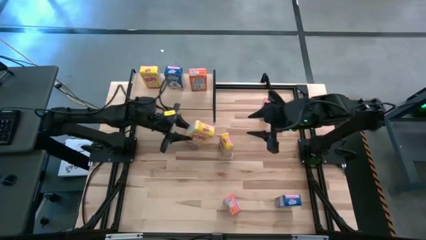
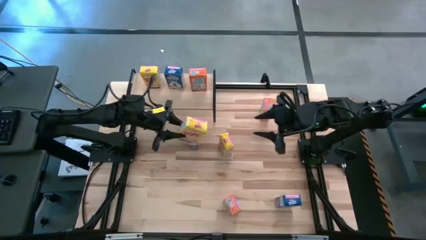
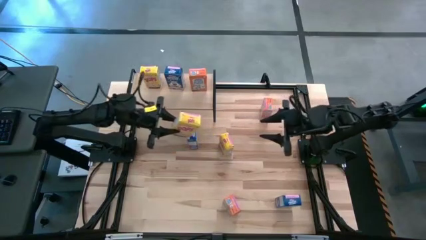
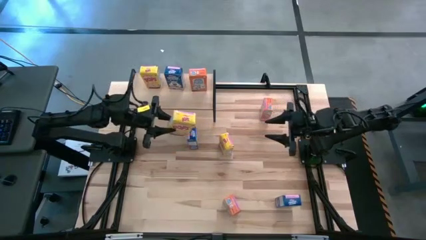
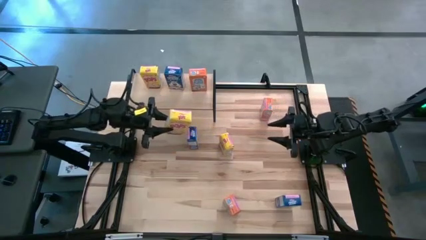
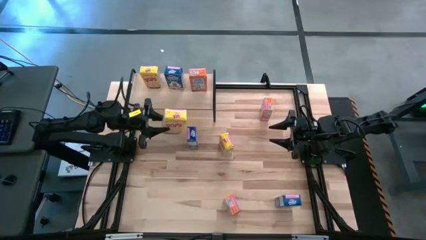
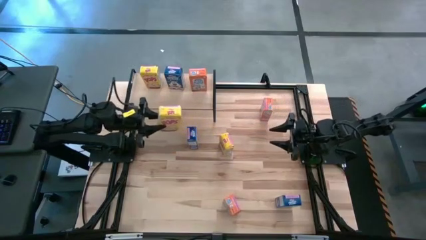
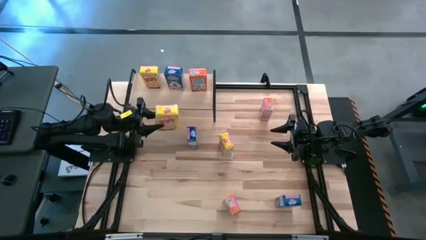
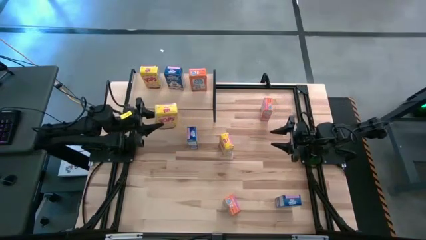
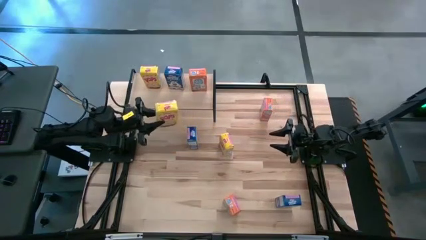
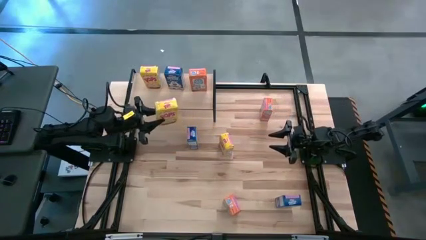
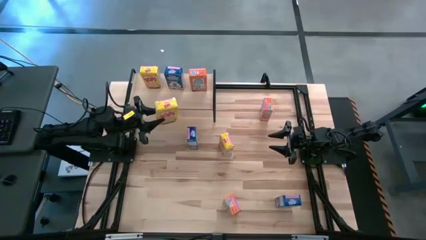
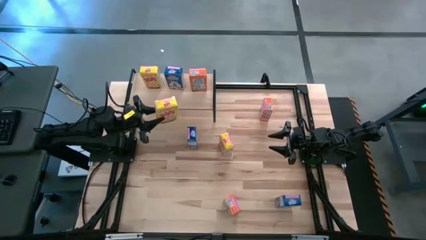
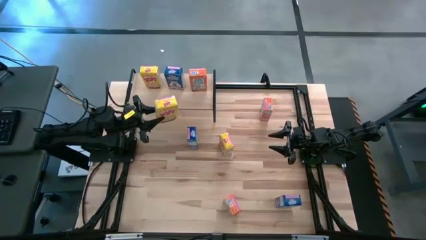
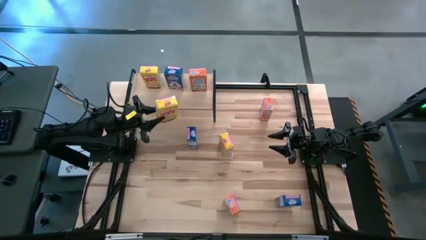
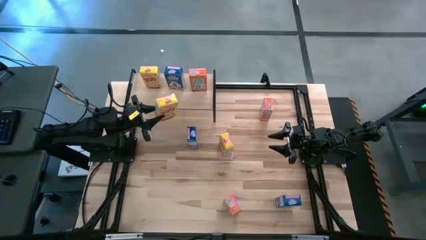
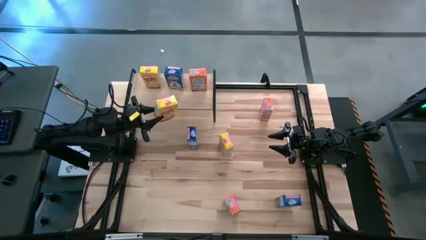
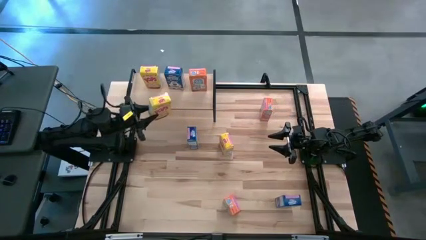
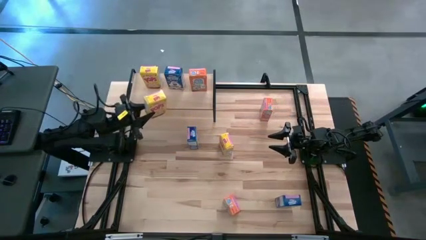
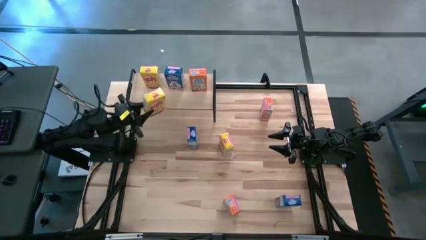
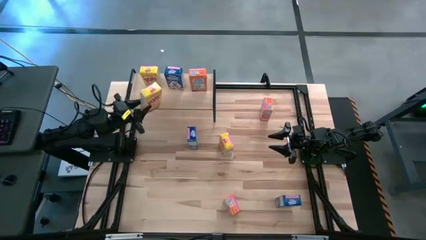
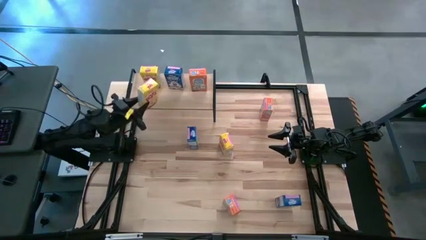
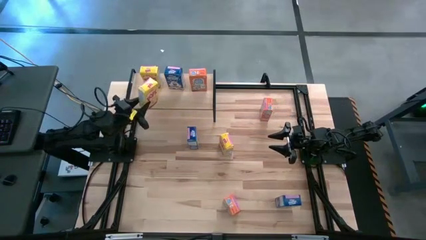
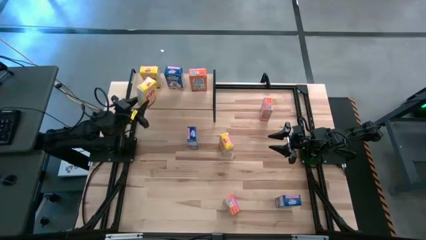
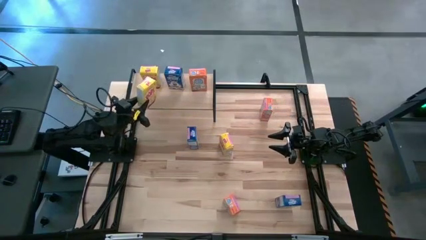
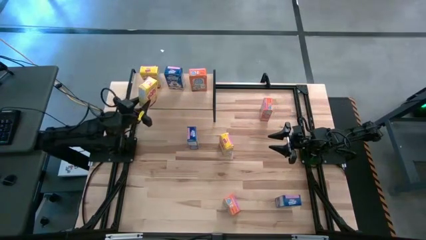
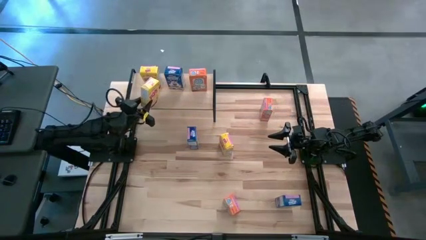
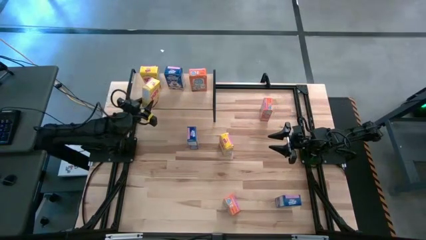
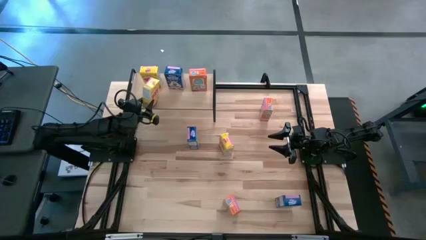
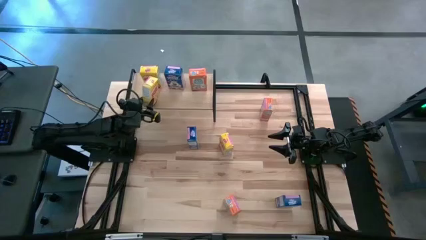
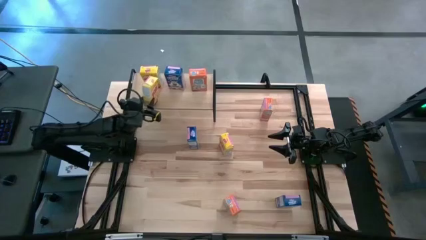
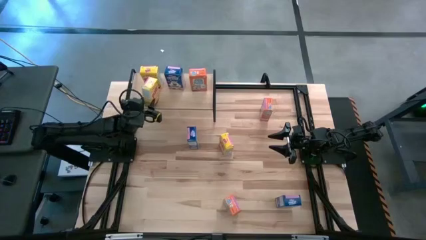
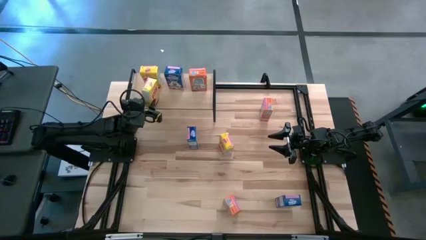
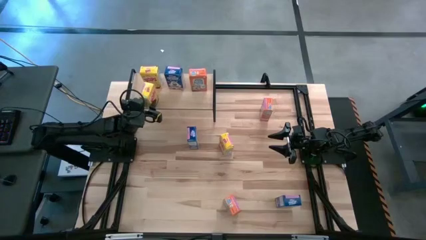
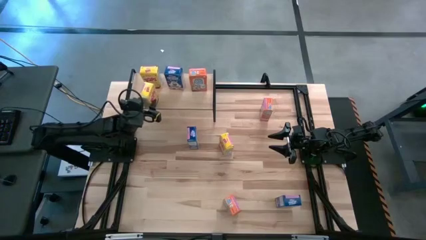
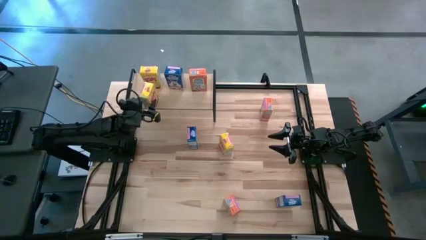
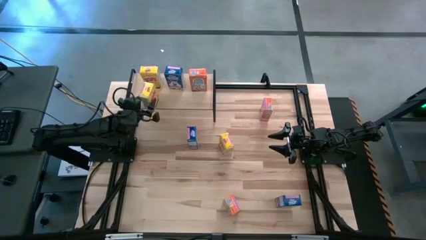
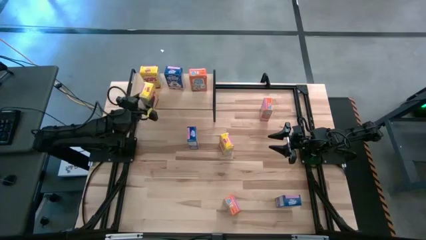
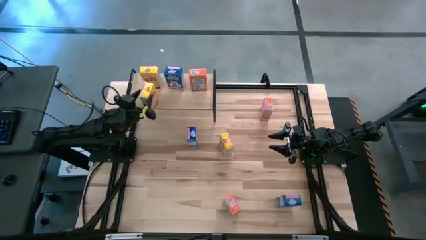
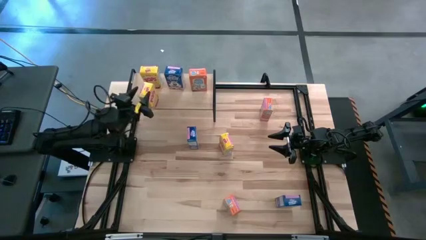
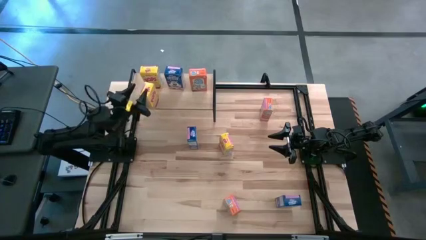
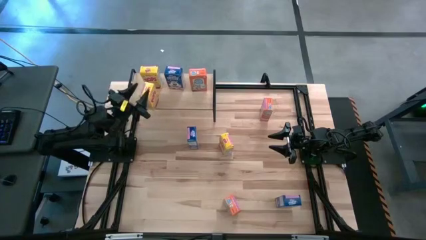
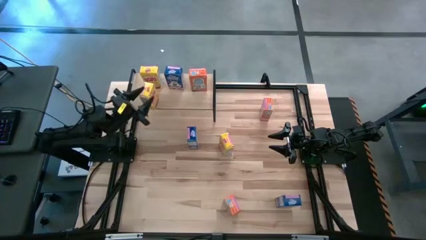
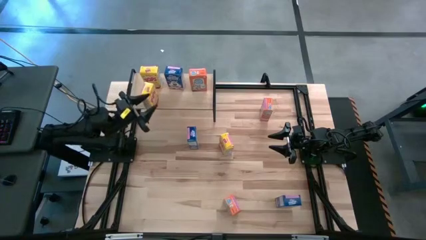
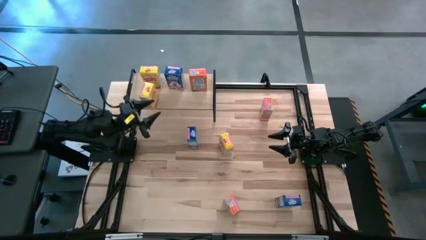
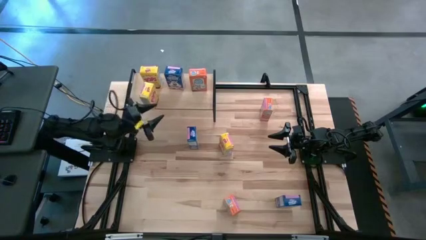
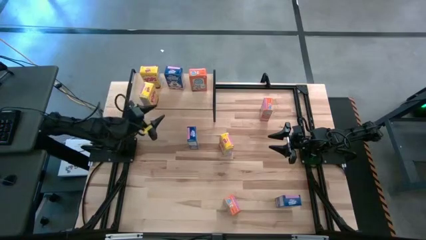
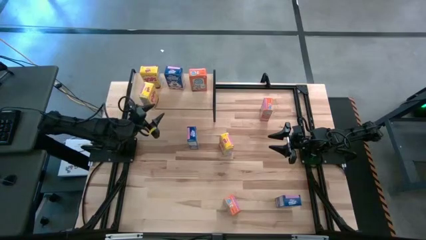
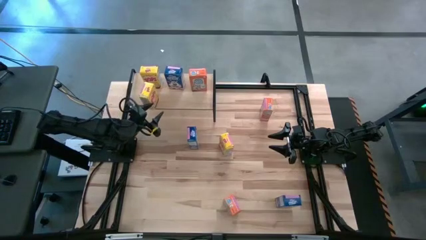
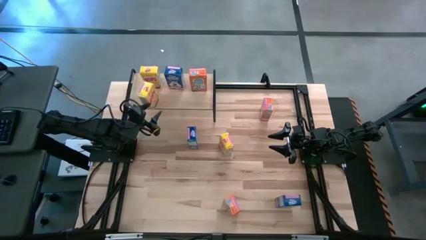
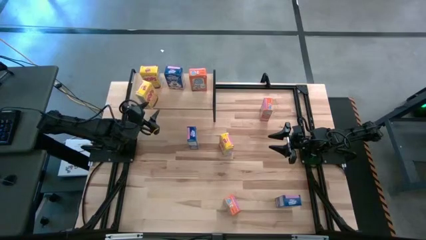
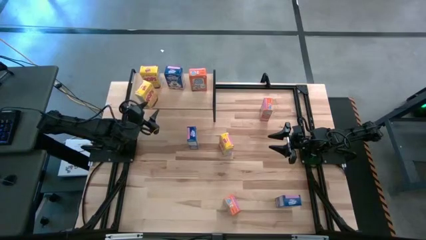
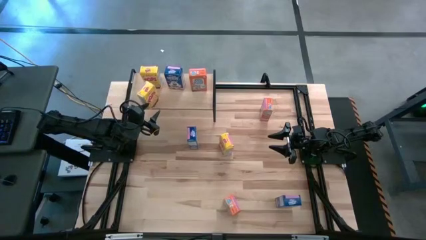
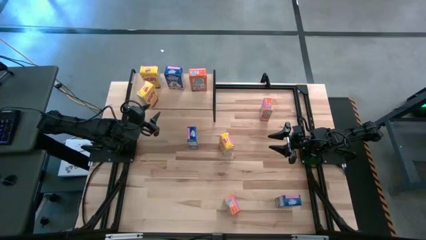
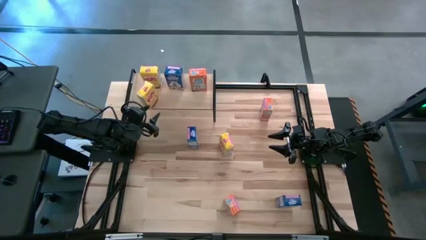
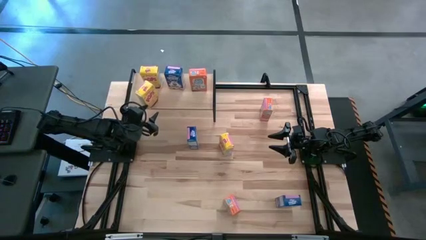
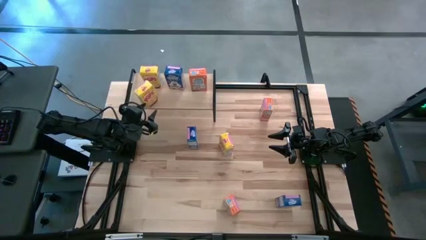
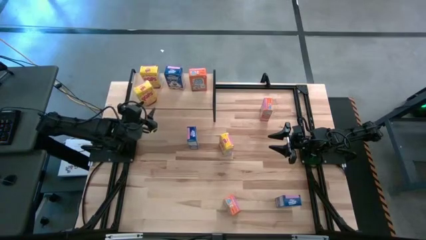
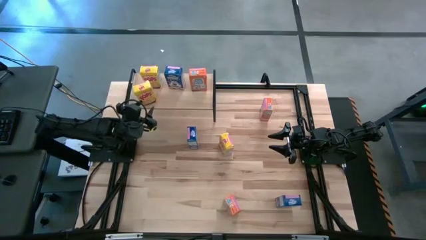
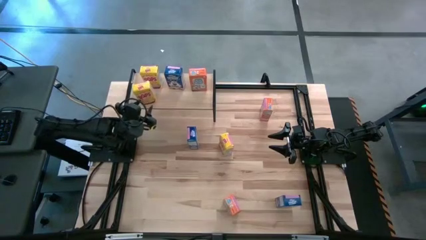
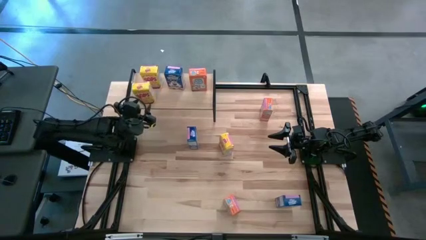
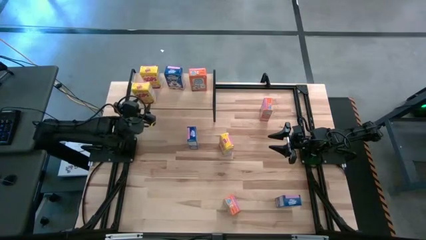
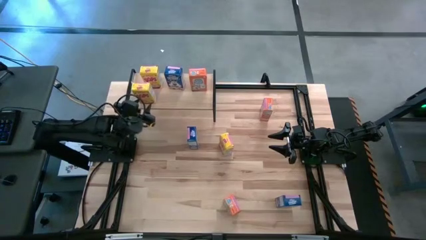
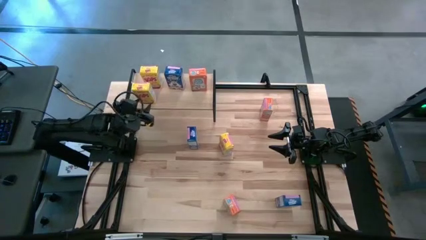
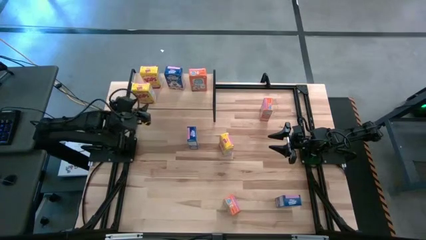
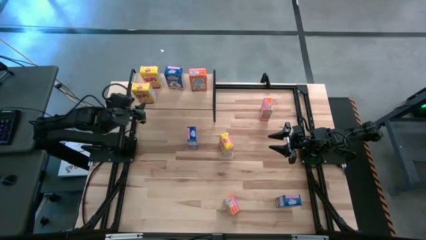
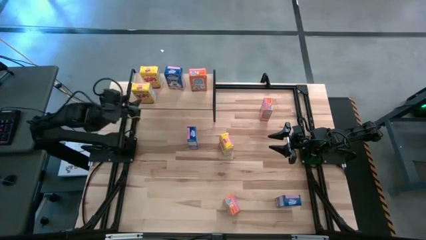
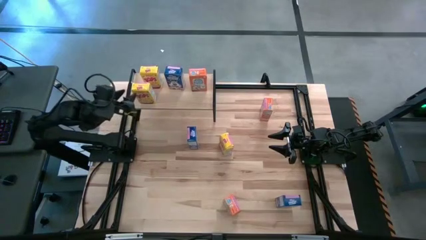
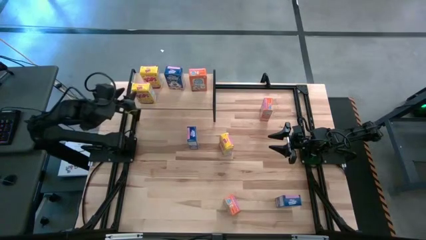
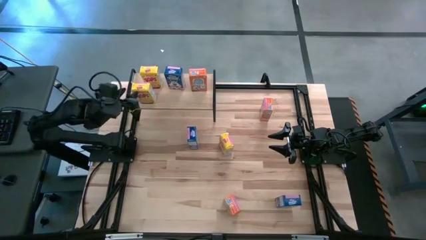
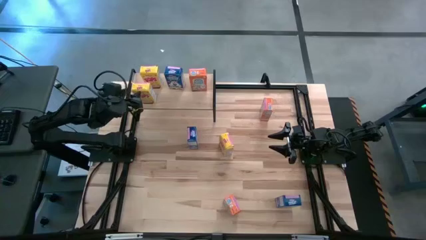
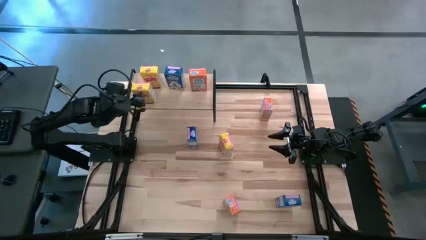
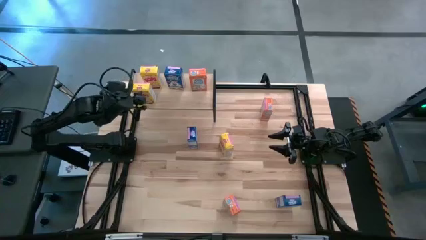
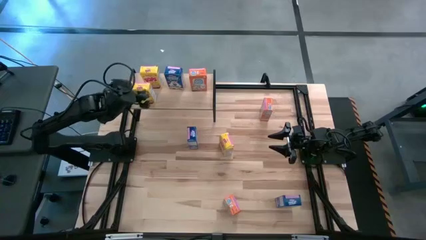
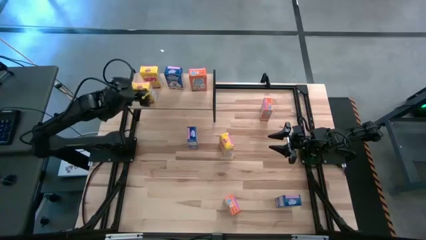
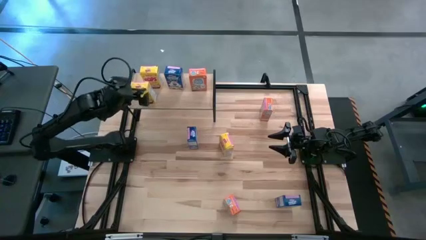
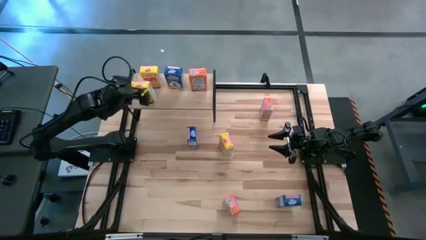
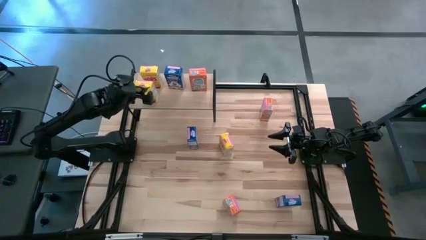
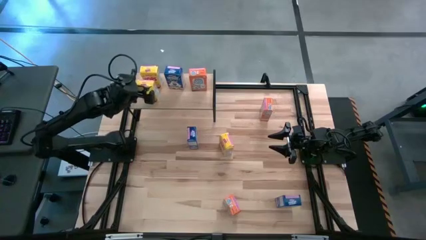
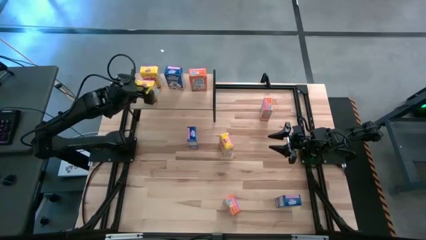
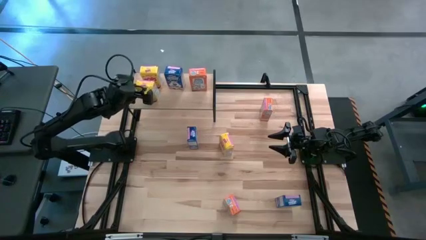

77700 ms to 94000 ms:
Task: Stack cereal on shelf
Put the right yellow cereal box on the shelf aligned with the other yellow cereal box
